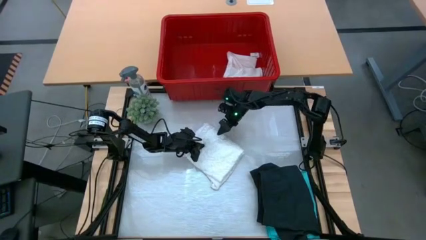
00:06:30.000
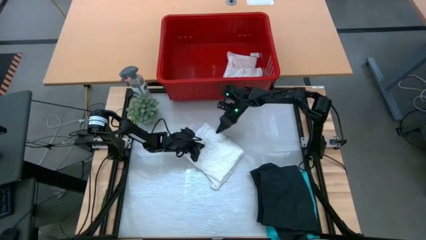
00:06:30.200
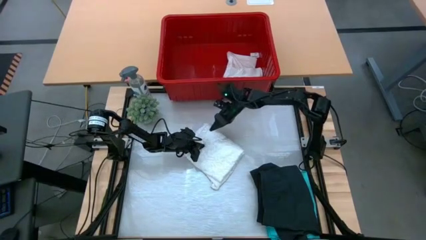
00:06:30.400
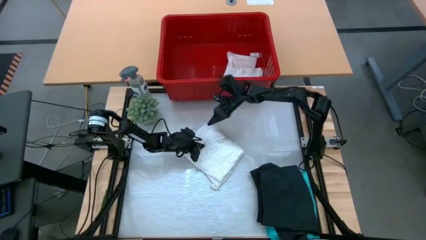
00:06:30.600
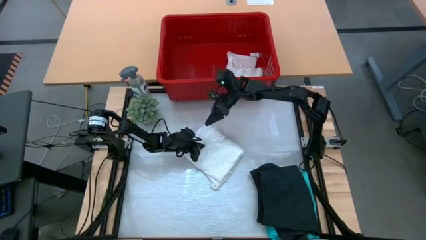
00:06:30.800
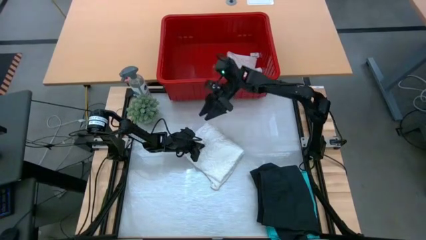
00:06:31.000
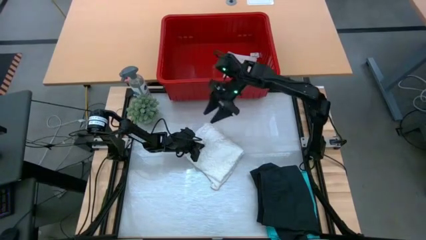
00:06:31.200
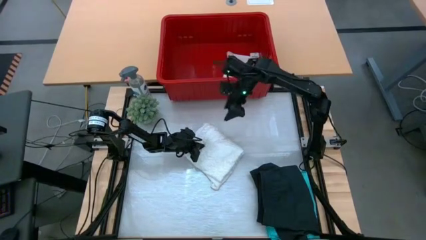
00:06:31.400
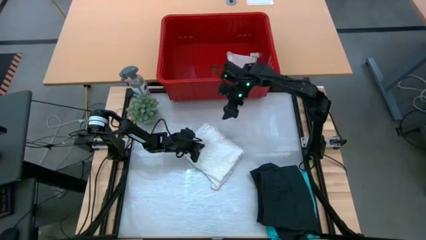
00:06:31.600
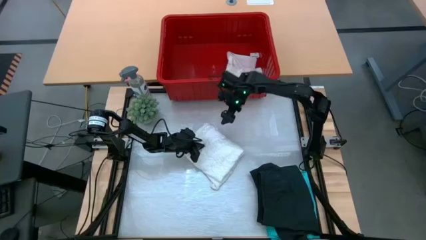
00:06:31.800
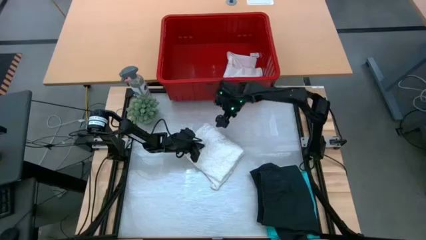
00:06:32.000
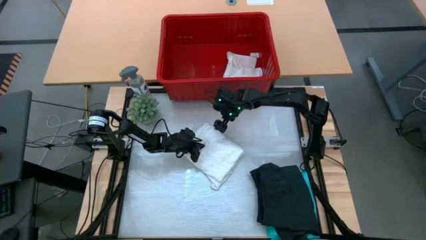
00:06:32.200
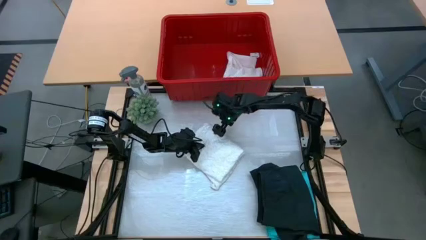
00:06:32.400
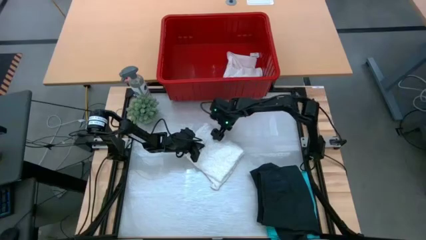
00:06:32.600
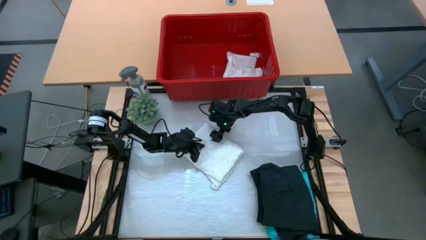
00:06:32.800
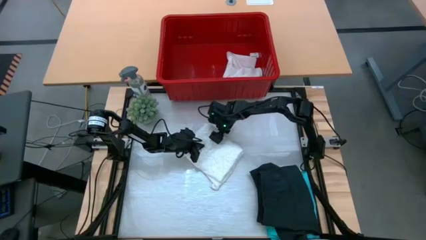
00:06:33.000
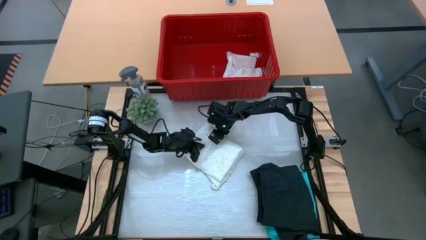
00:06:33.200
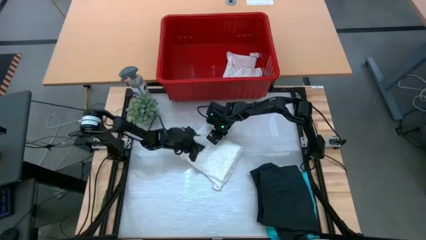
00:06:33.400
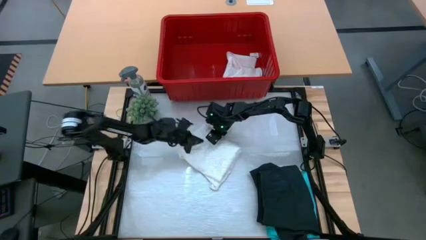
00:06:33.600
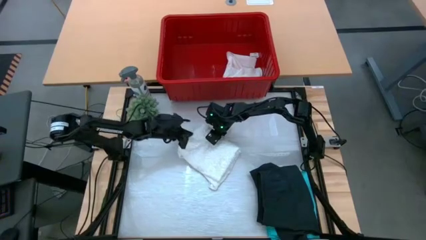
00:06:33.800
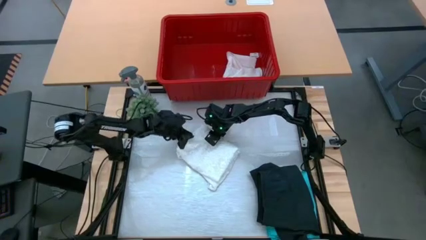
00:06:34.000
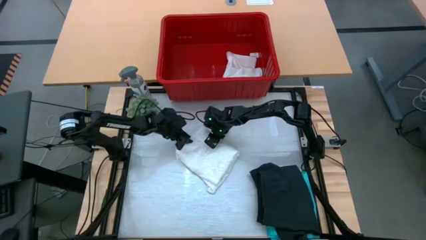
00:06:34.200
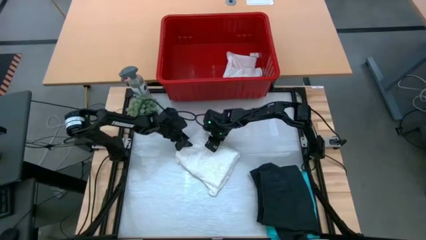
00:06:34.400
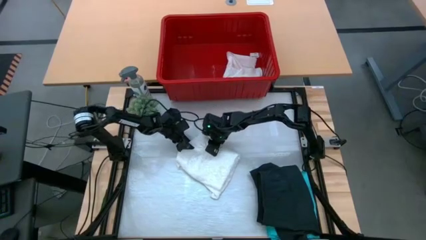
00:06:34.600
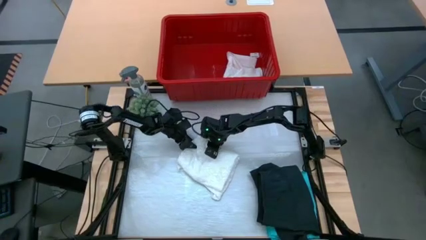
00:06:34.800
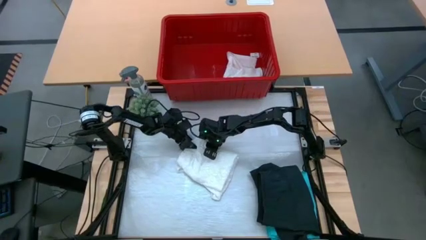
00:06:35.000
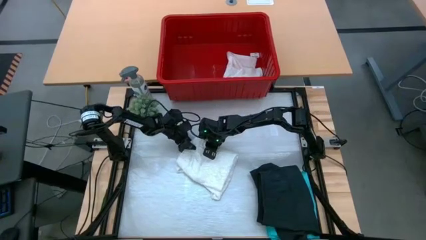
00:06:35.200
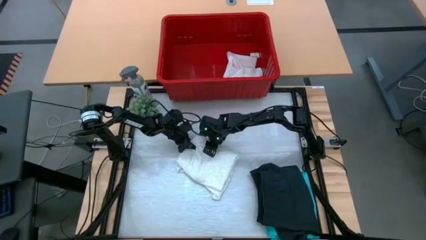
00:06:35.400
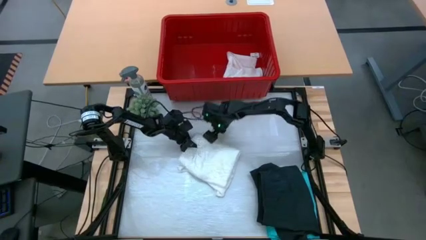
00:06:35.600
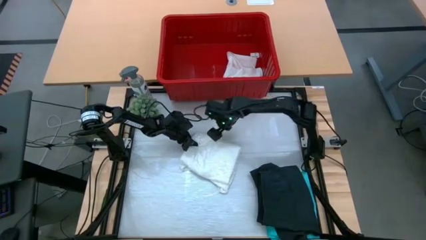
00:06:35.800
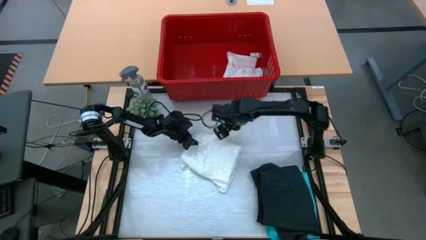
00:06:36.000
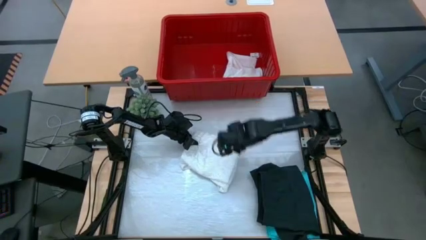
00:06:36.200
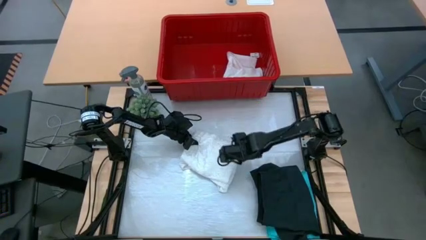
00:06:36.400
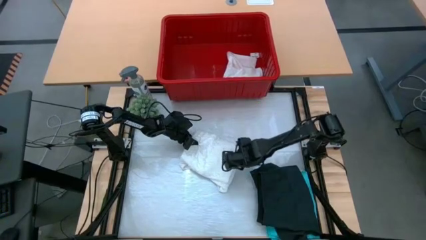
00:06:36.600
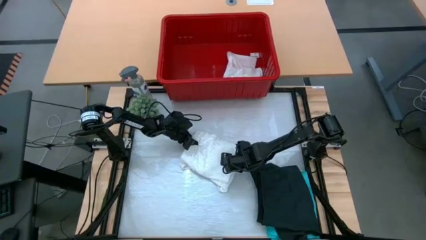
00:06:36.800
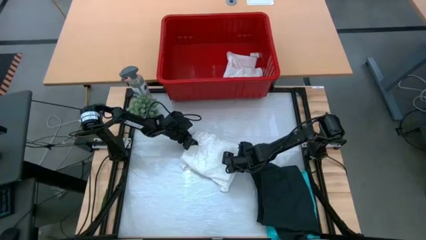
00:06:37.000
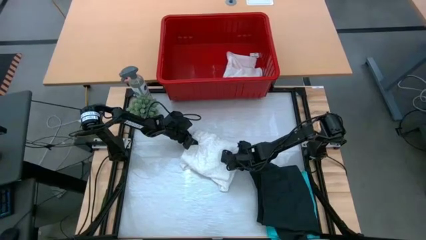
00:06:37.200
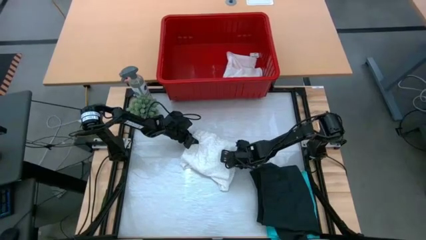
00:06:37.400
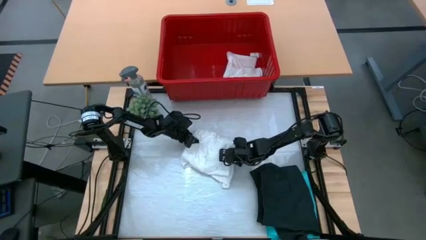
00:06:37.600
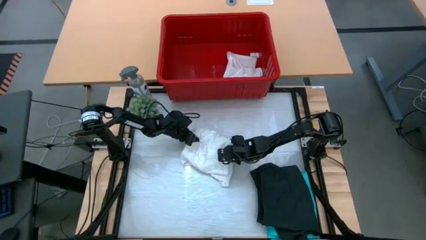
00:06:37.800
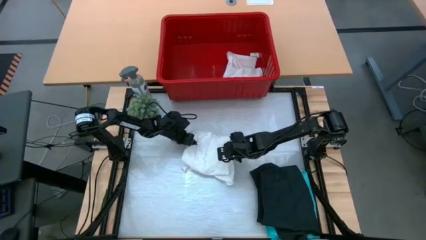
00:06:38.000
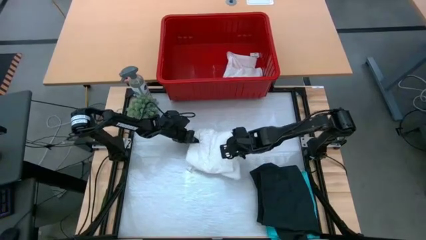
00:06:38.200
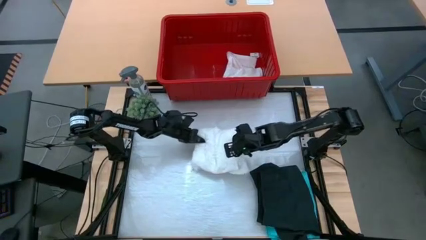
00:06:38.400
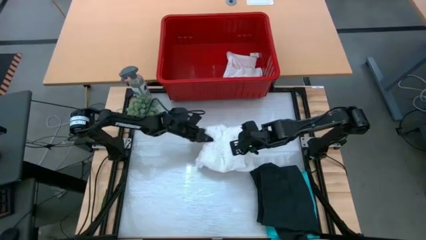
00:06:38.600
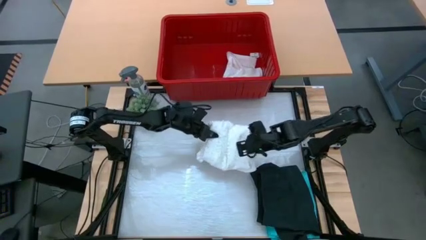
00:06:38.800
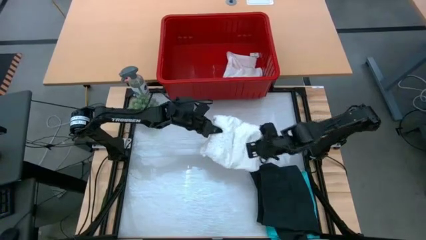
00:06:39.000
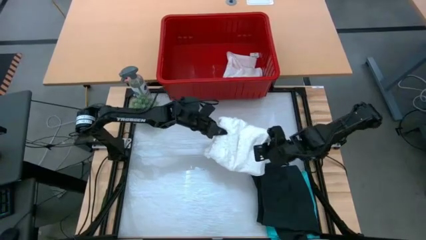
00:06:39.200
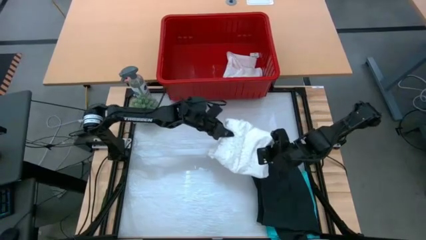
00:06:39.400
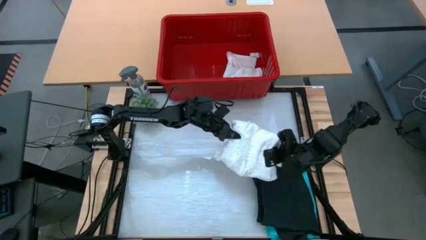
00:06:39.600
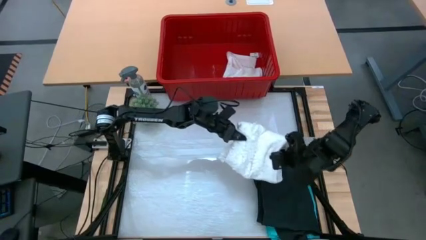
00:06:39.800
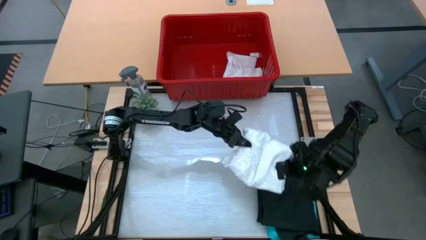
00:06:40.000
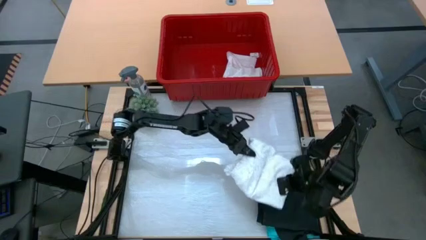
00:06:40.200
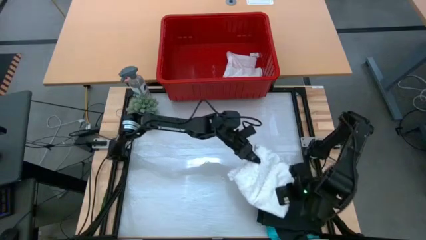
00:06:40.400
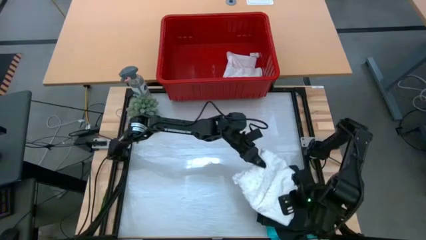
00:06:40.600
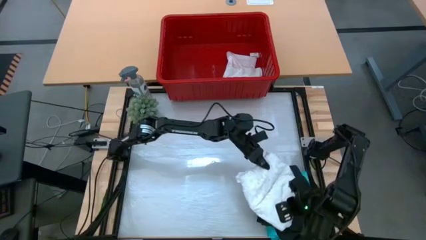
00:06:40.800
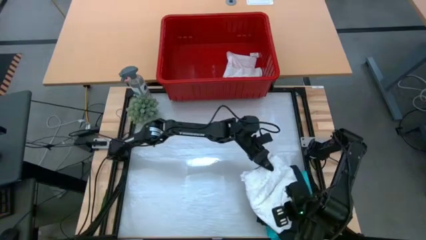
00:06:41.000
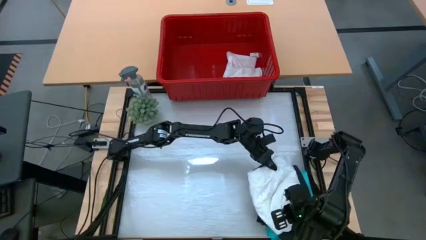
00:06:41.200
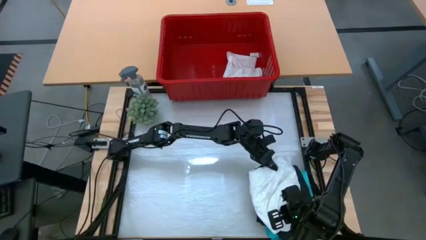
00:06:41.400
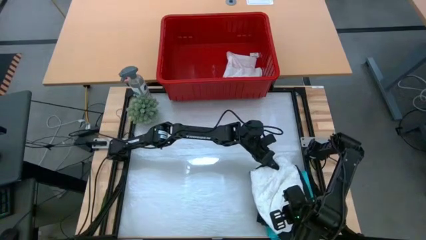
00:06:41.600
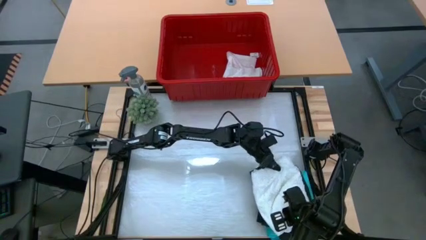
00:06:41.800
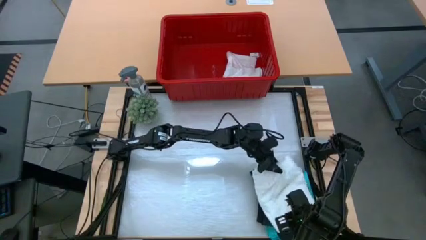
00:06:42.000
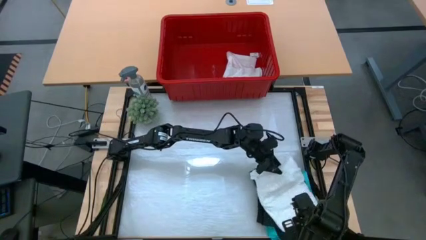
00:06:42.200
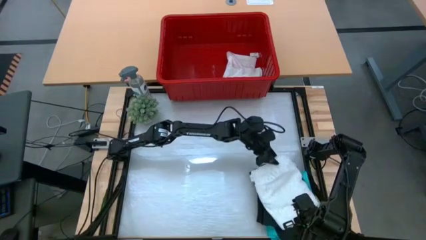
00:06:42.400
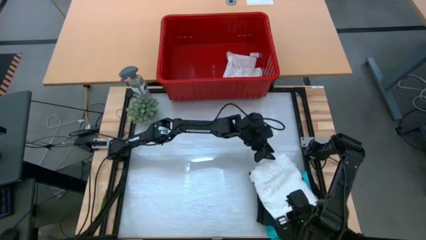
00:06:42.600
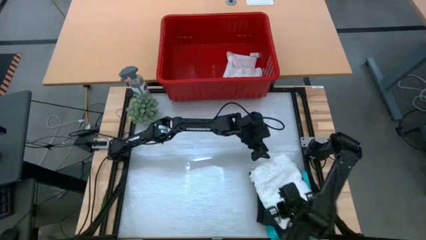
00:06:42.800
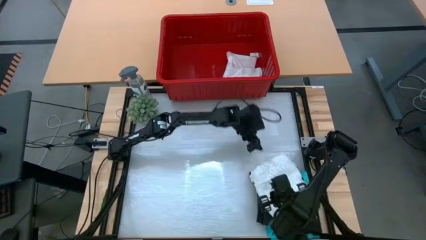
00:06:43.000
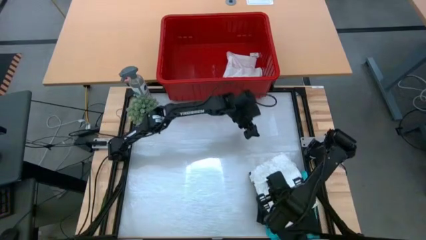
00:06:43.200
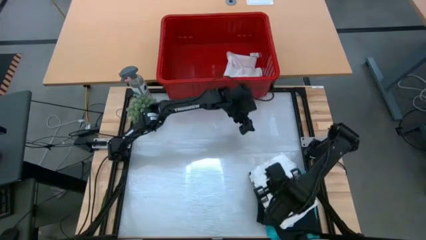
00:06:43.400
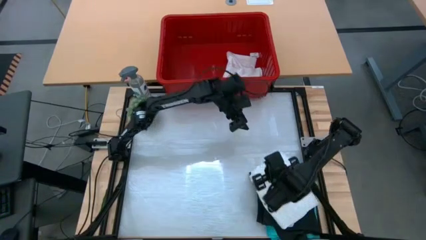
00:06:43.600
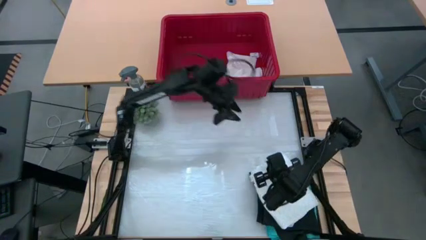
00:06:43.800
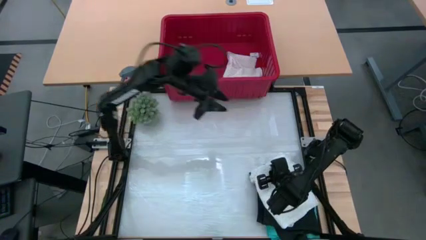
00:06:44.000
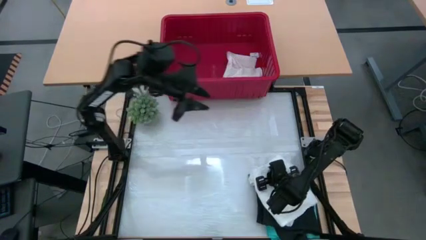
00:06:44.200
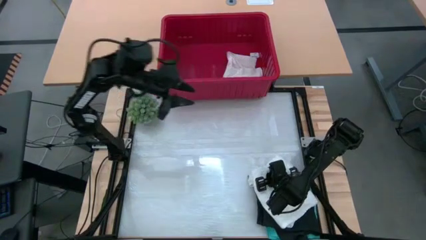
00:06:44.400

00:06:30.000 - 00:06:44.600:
Task: Fold Laundry from Bin
Stack the white t-shirt on top of the black shorts

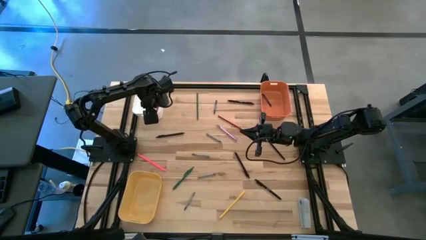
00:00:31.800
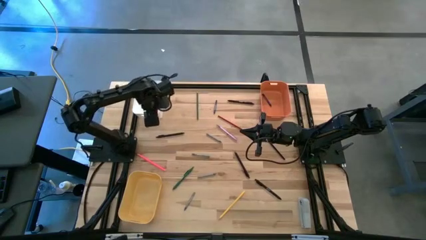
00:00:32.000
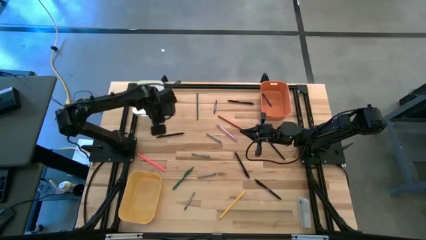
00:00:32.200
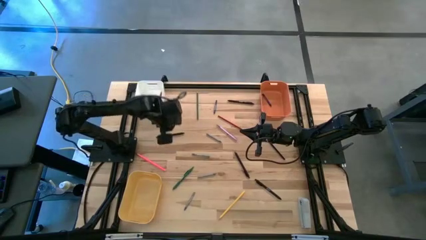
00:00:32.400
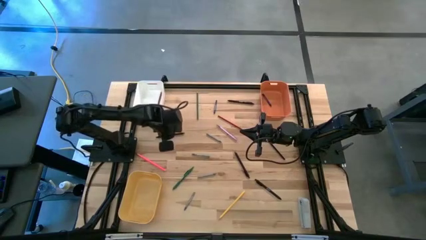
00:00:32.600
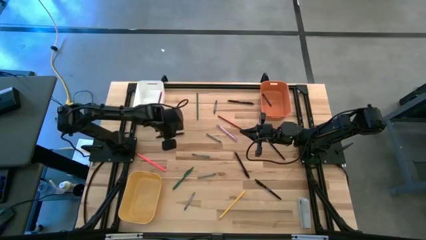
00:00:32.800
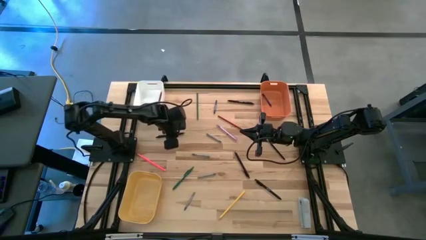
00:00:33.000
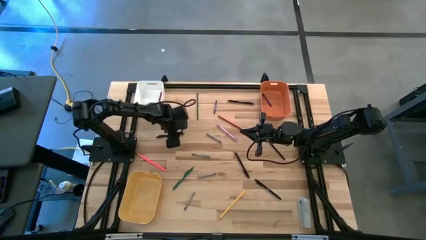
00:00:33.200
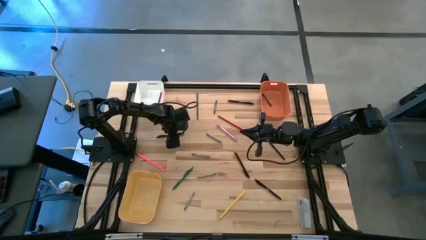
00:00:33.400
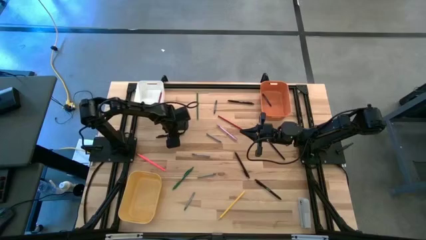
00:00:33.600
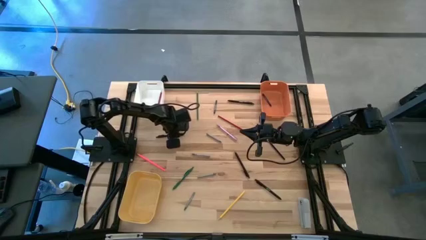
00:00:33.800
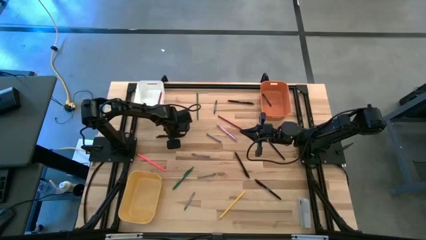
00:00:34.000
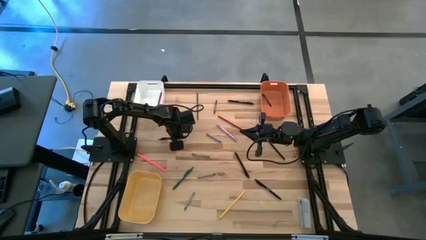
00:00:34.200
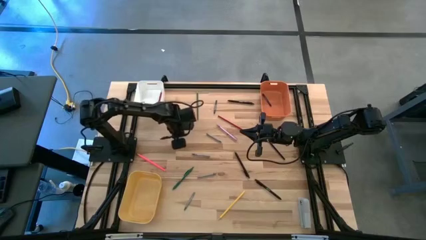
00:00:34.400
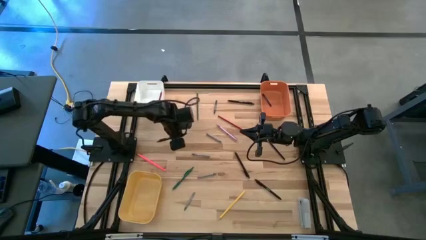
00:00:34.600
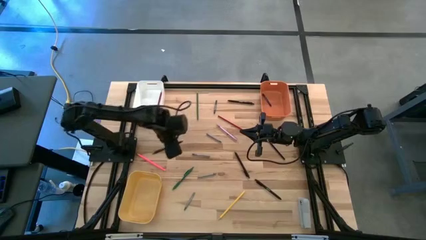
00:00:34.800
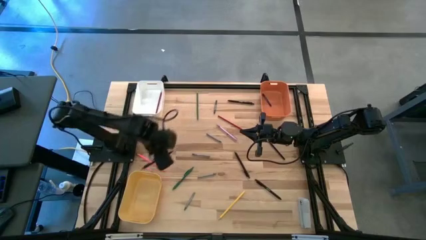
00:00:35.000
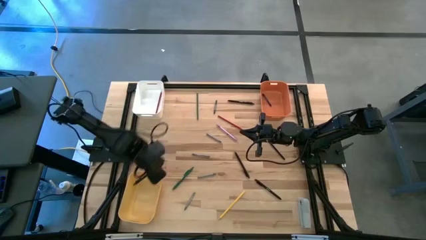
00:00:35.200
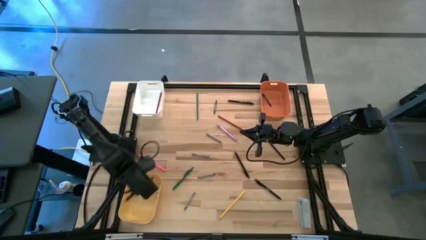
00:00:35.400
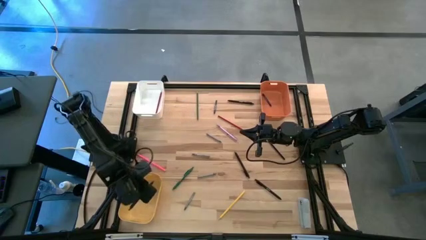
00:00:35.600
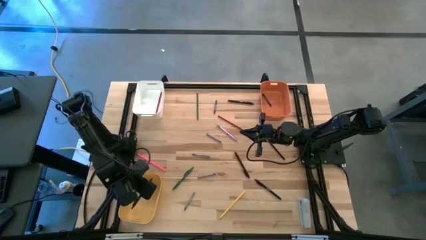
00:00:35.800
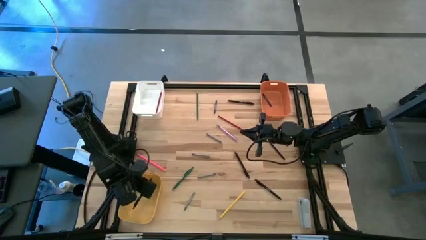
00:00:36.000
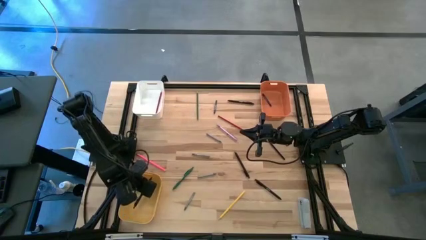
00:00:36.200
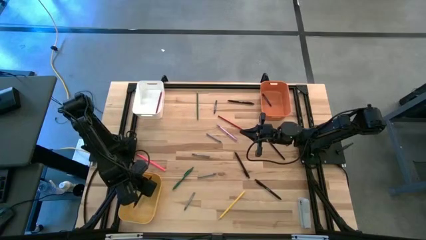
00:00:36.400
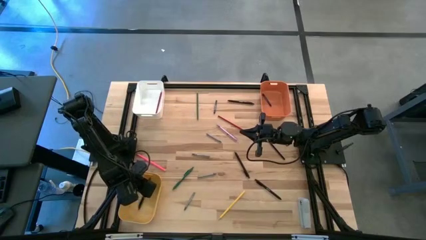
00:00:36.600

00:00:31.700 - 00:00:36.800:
Task: Sort crayons/erasers/pens/pencils in bins
Put the middle left black pen into the yellow bin
